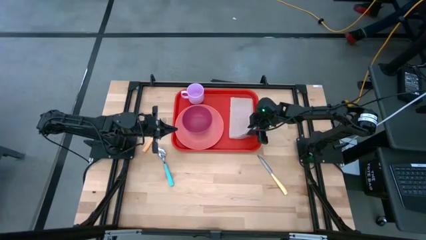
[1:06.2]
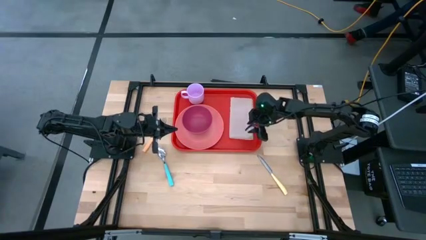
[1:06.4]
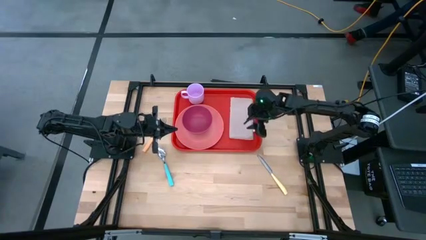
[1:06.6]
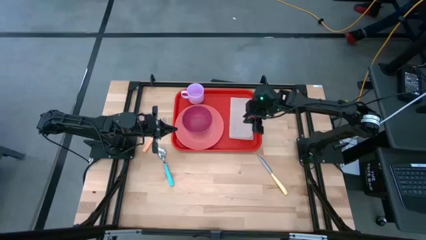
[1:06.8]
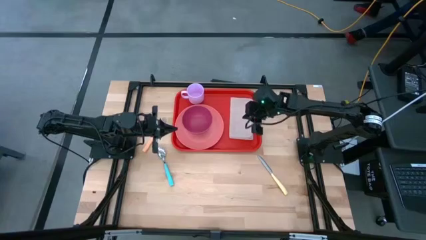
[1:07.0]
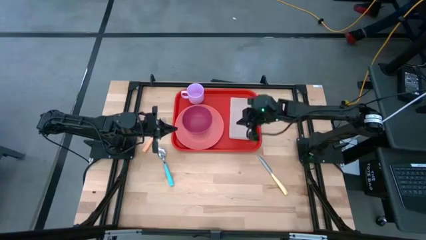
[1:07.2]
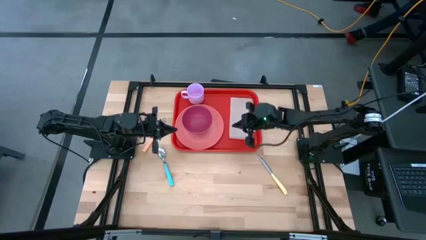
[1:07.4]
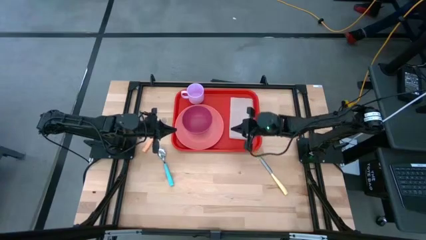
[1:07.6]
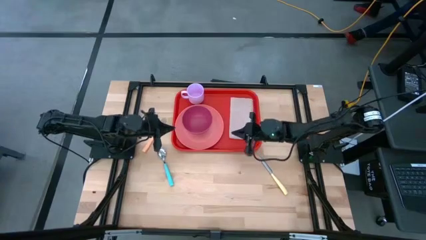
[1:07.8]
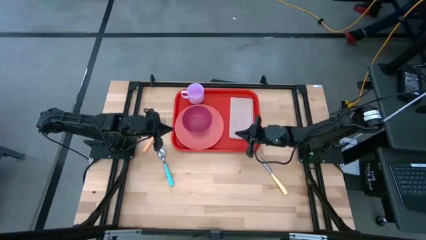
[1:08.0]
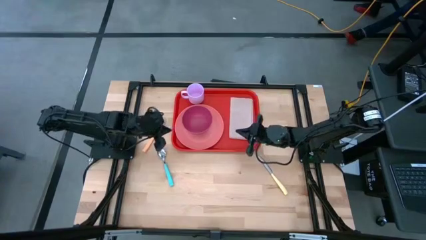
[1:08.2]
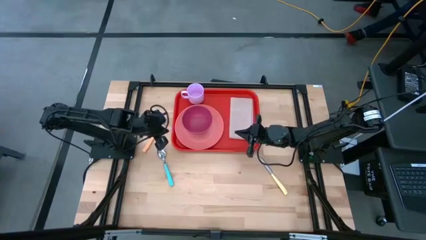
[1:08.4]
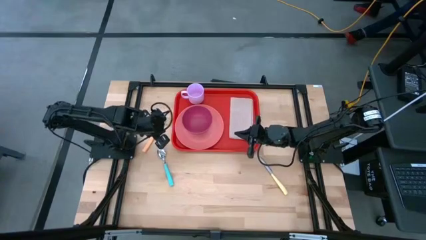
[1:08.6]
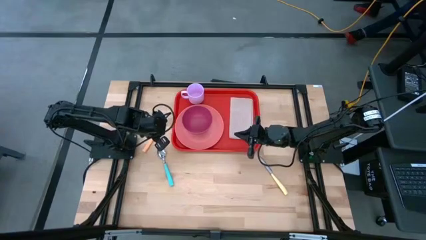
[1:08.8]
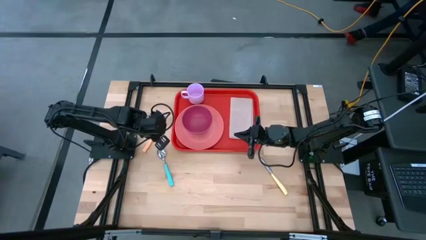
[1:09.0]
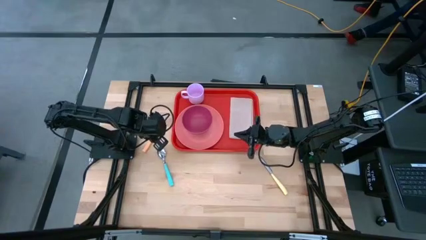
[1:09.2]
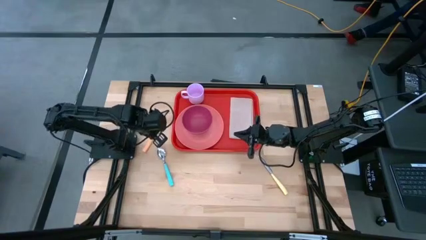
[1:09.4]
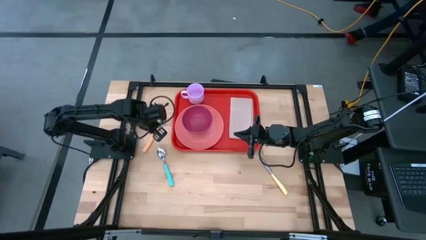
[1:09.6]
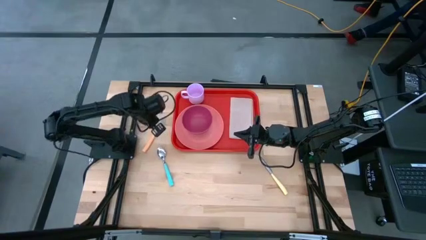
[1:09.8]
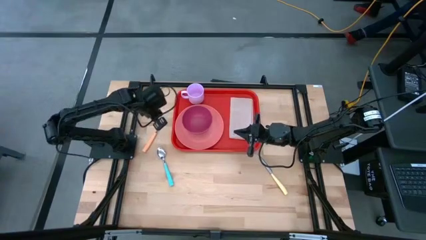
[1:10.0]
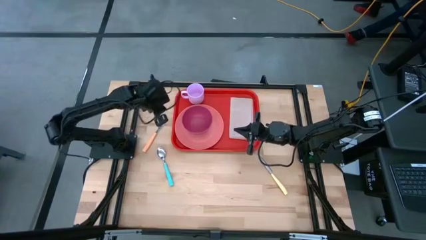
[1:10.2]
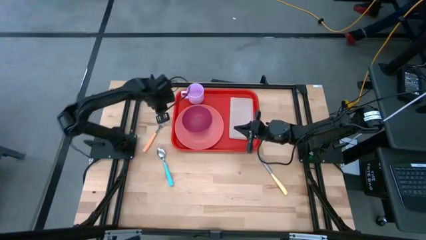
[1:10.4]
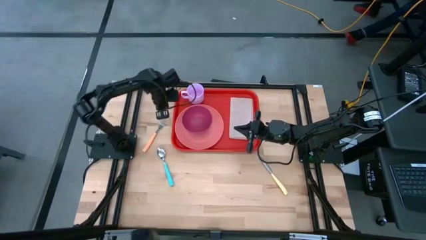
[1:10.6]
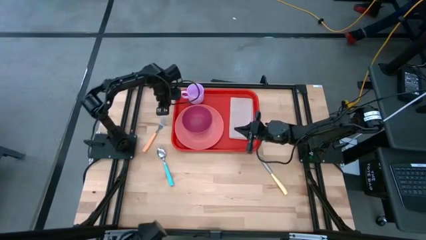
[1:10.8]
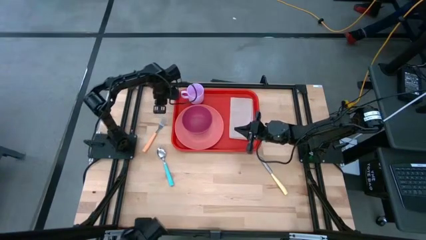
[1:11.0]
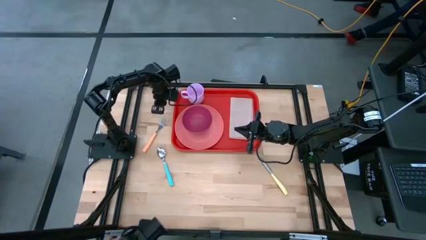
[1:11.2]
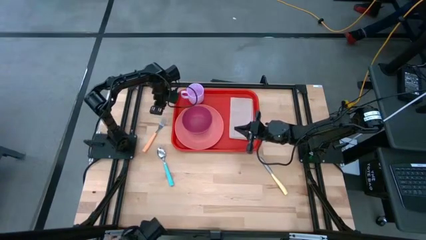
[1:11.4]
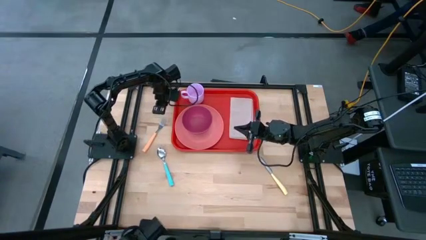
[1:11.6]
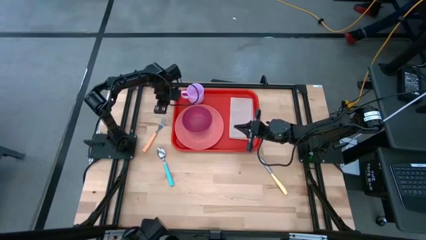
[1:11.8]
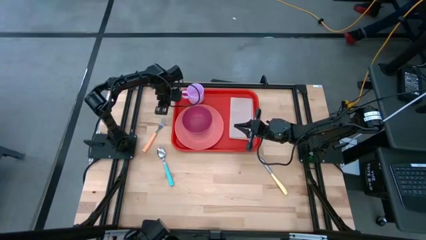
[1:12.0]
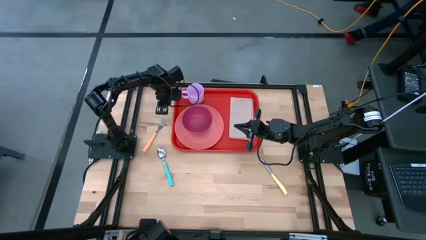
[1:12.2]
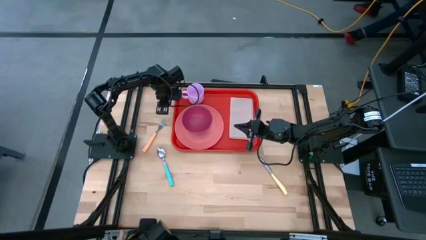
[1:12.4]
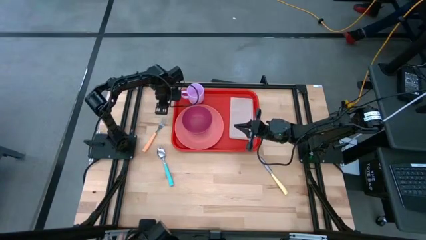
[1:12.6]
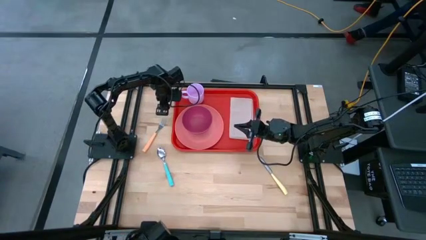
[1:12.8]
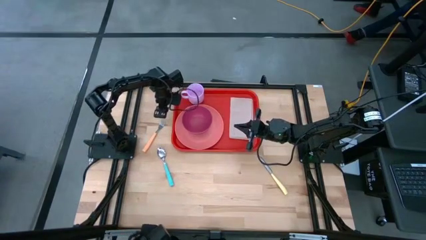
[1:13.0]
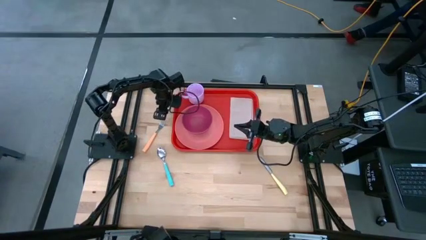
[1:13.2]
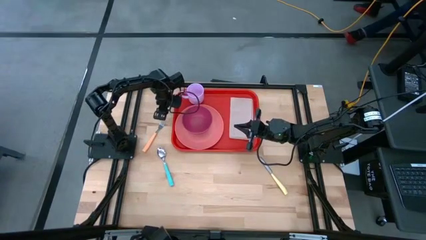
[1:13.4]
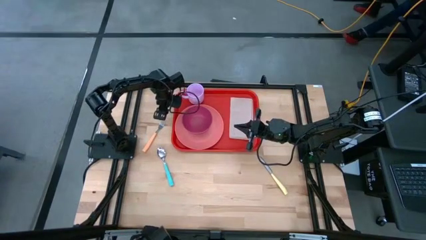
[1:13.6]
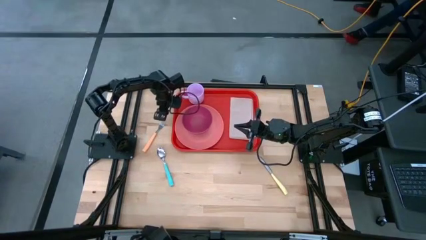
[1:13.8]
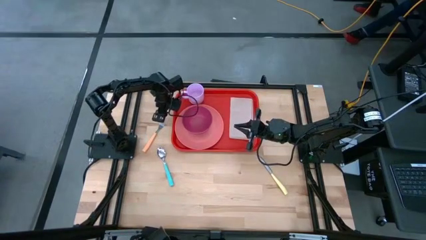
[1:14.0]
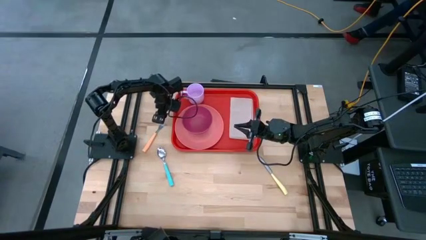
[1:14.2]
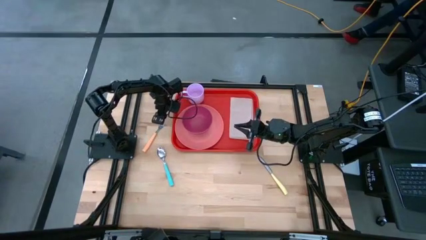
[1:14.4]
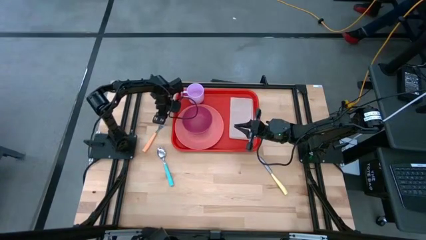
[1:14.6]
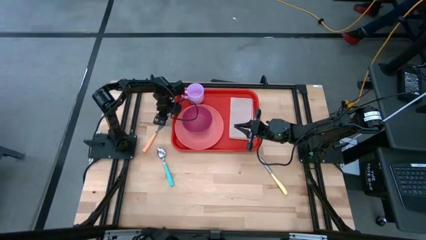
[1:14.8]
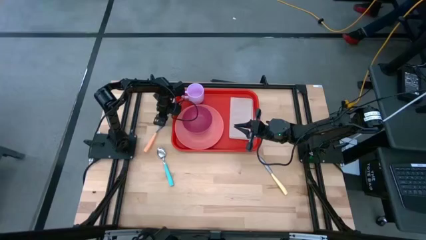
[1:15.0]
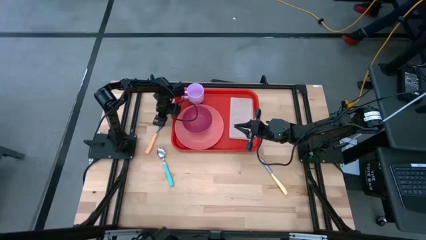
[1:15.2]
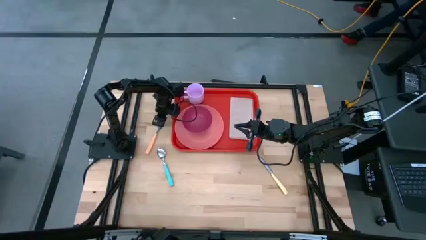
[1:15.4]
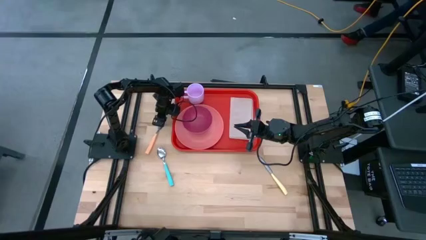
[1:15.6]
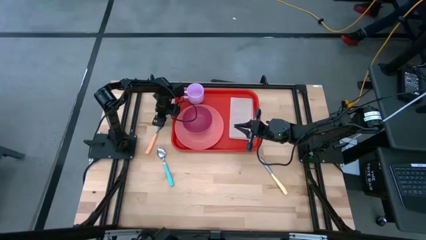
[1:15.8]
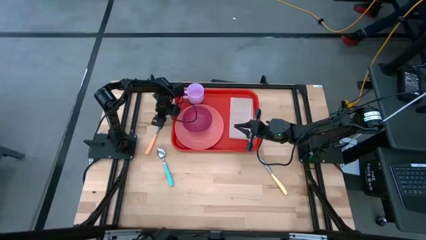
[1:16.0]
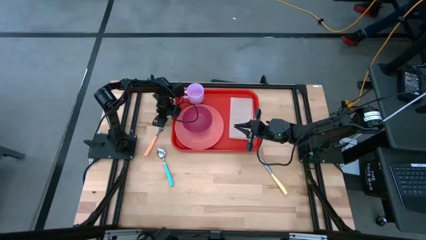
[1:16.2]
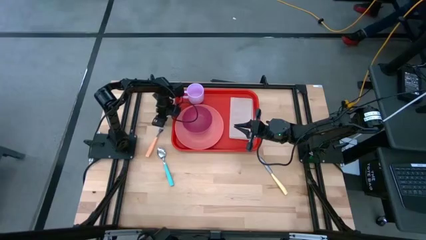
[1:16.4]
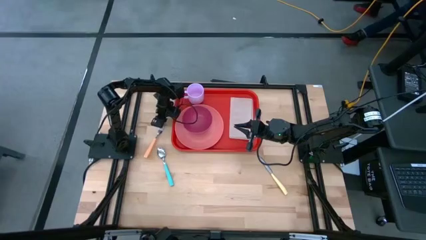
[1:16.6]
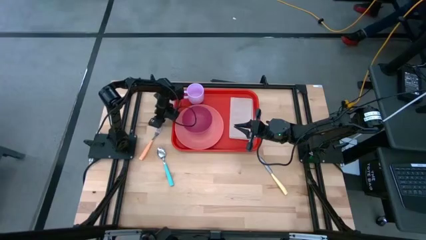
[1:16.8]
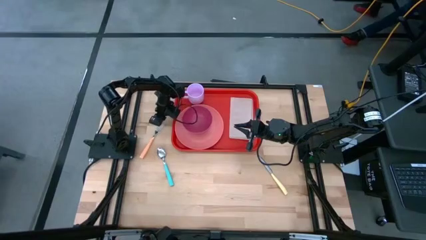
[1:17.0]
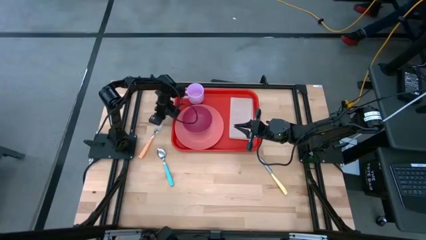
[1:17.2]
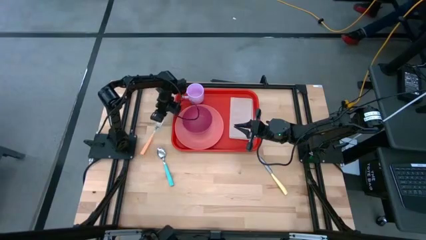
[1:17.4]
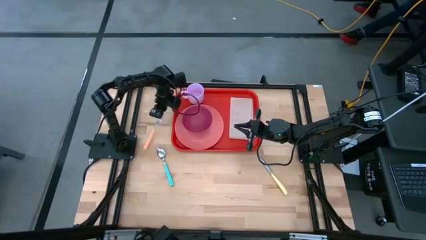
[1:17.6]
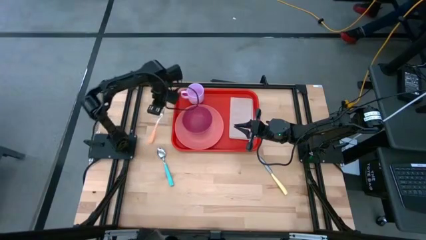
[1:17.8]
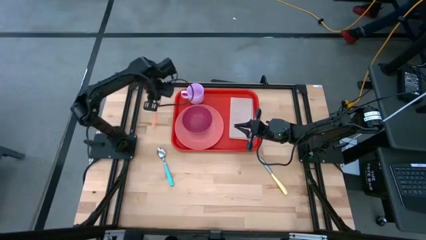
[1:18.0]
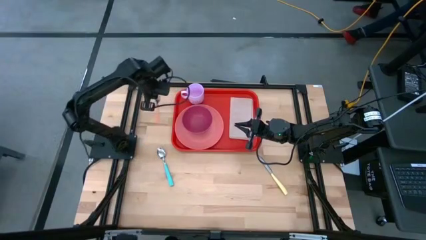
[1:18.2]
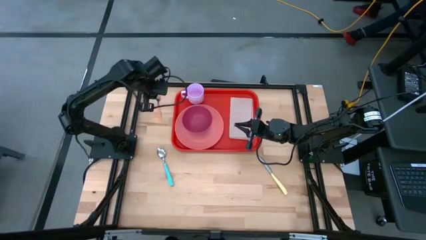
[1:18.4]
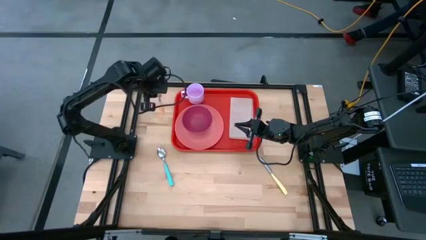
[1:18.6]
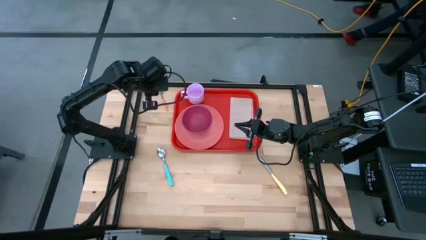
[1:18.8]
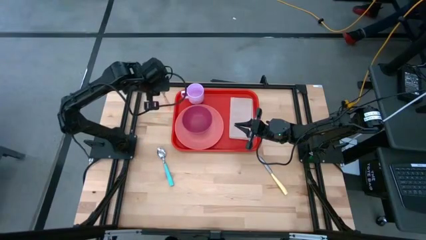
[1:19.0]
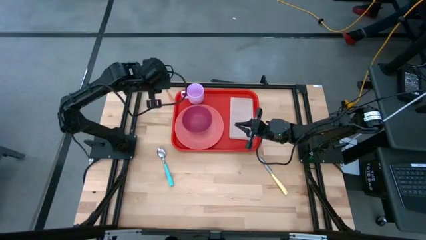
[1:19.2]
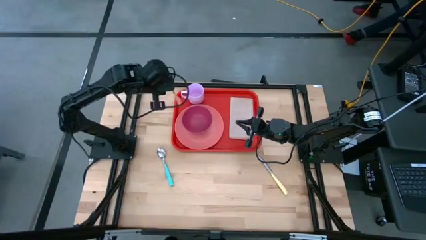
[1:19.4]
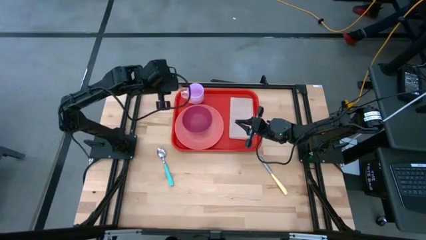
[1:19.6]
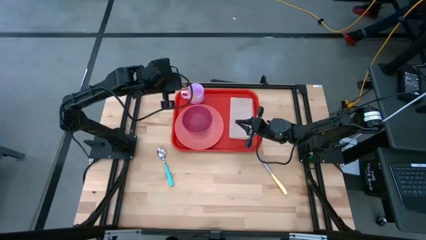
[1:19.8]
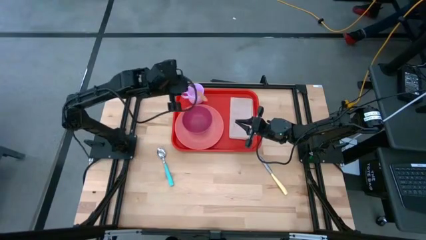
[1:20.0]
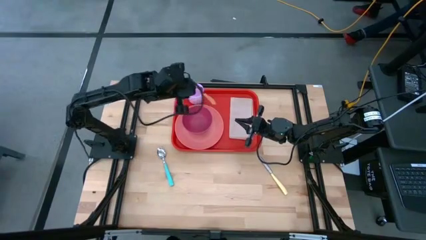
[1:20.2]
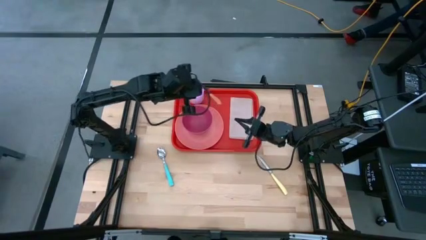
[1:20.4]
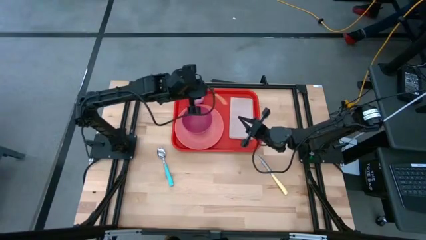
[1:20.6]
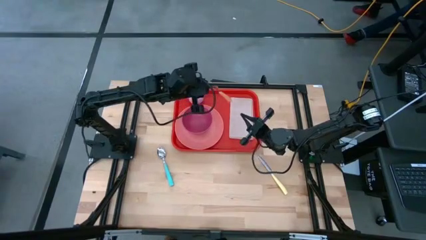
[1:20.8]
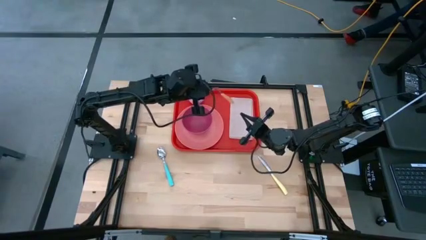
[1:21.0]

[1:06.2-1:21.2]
Task: Set up tray
Put the orange fork on the brown napkin
